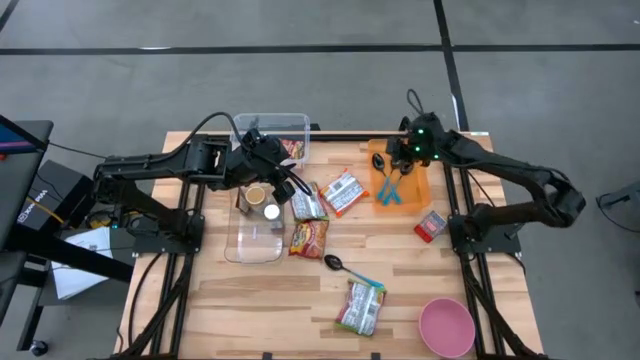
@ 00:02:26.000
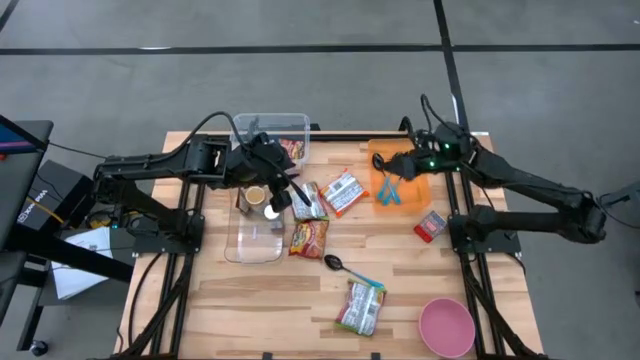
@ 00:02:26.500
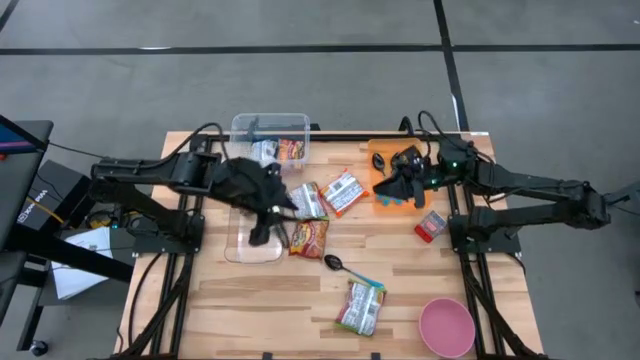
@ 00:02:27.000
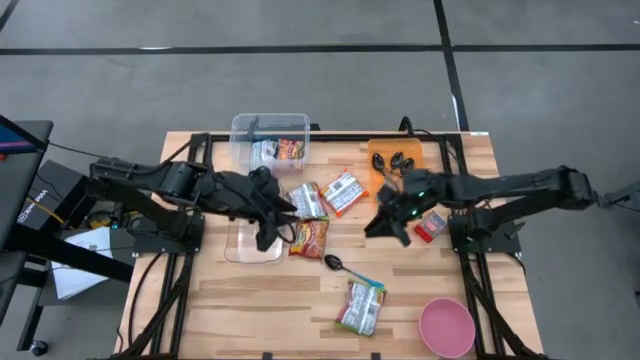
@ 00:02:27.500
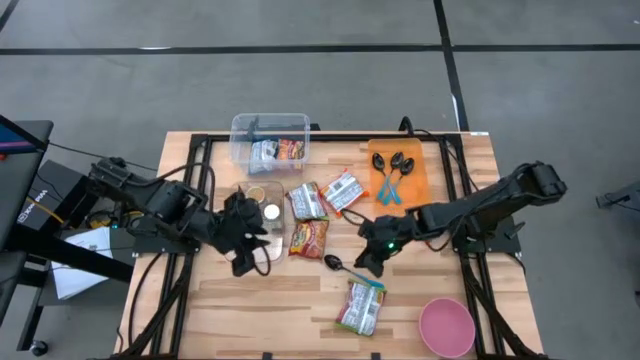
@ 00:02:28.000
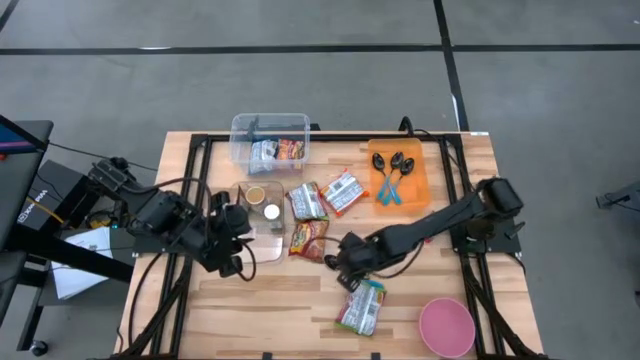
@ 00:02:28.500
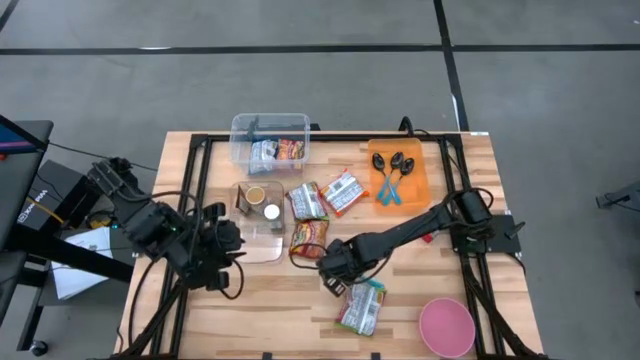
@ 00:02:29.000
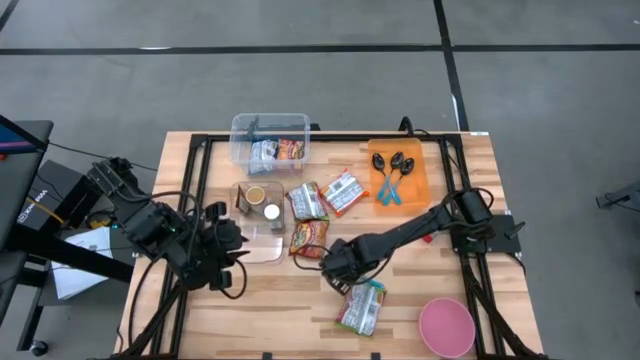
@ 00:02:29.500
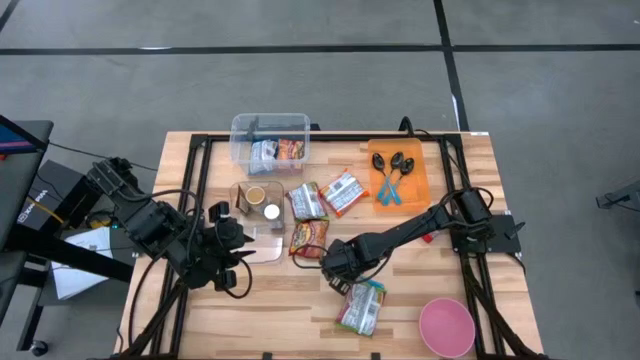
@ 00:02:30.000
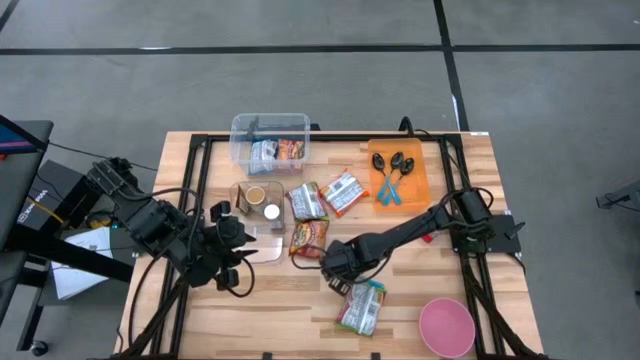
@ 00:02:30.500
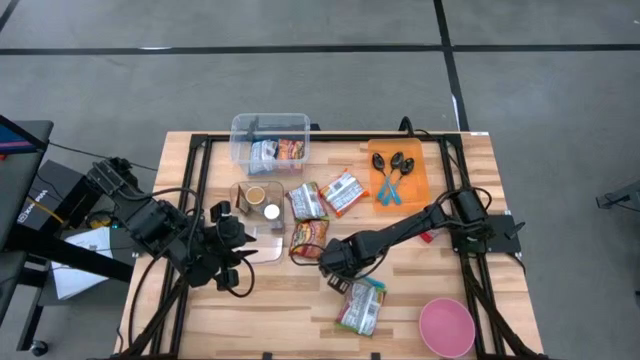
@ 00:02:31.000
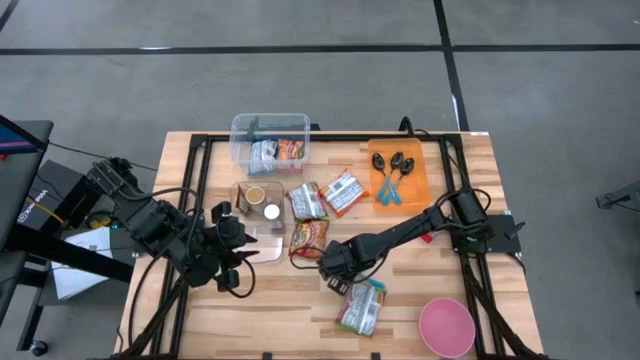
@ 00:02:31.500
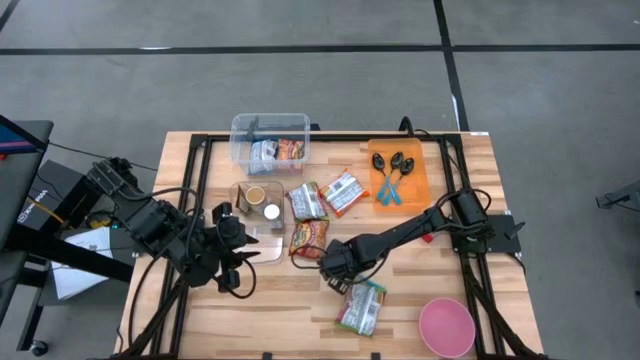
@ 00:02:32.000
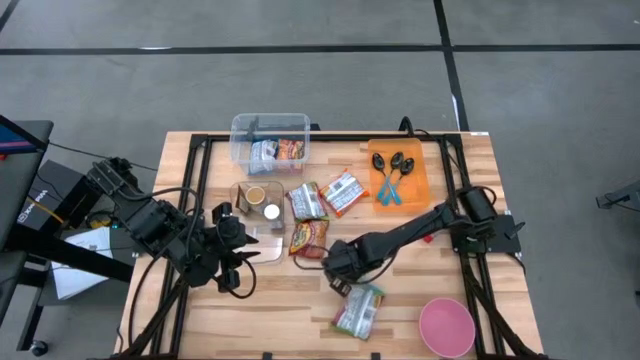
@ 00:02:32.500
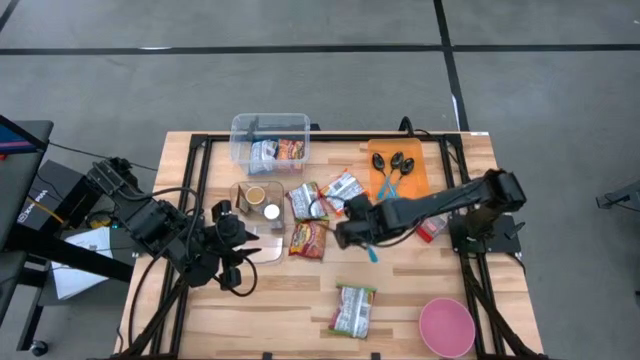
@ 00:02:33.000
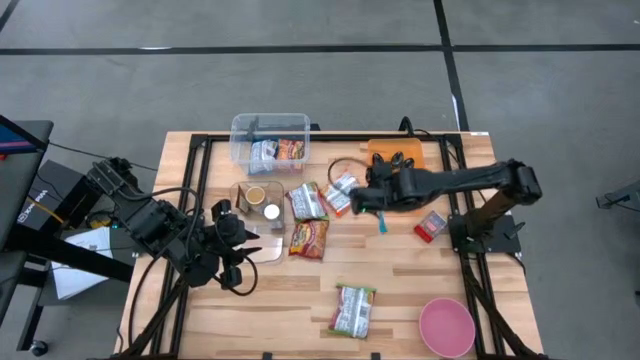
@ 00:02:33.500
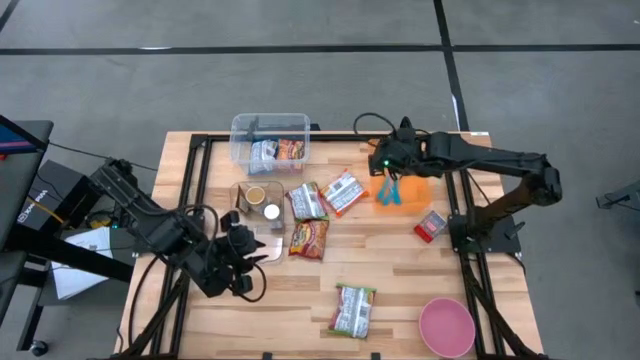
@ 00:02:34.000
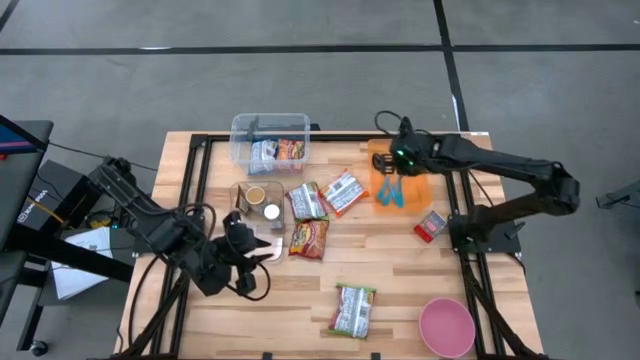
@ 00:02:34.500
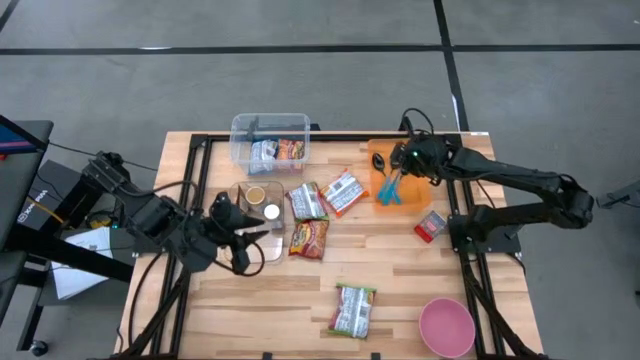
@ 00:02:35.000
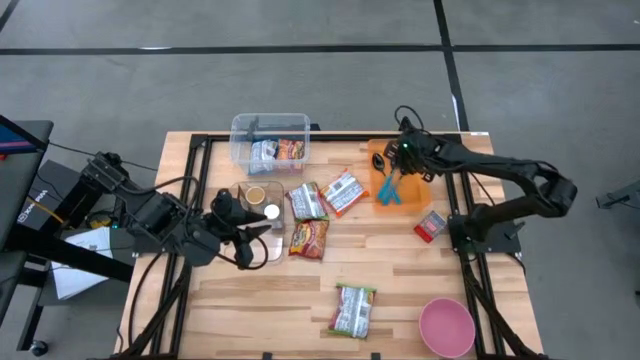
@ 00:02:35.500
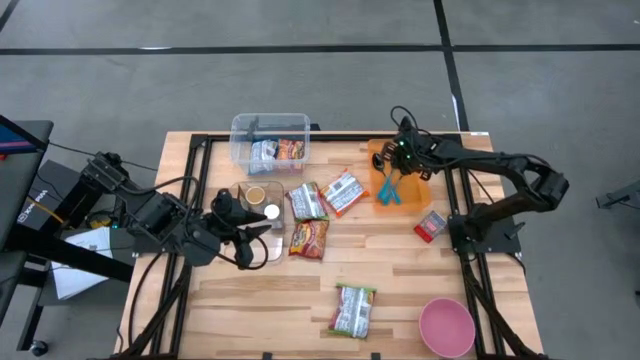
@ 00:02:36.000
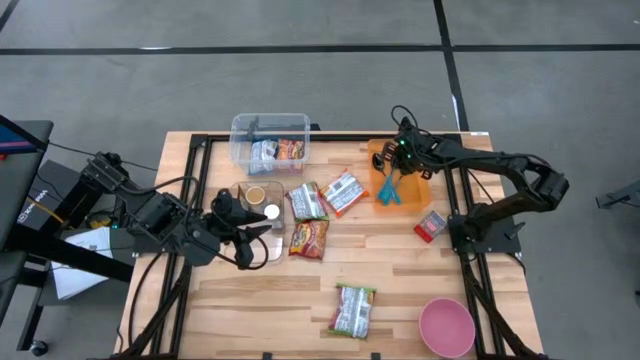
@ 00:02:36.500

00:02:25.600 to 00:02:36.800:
Task: Pick & Place Food Item
Put the blue spoon into the orange container

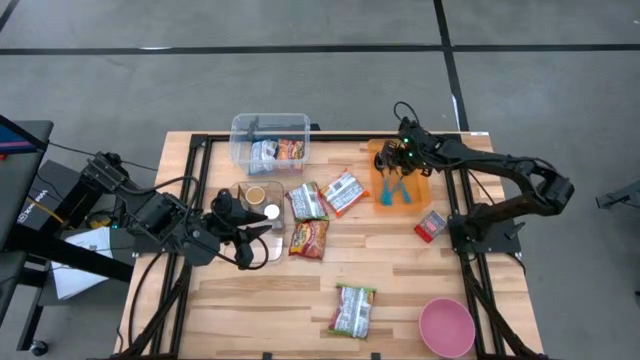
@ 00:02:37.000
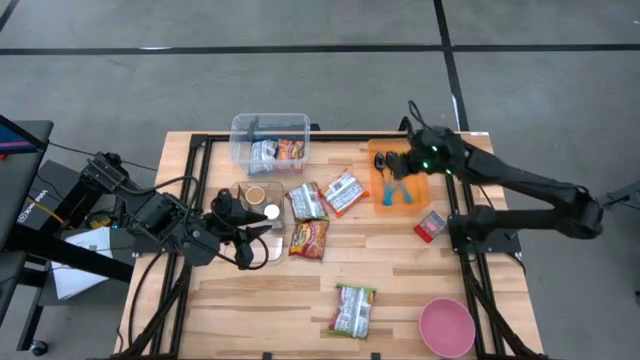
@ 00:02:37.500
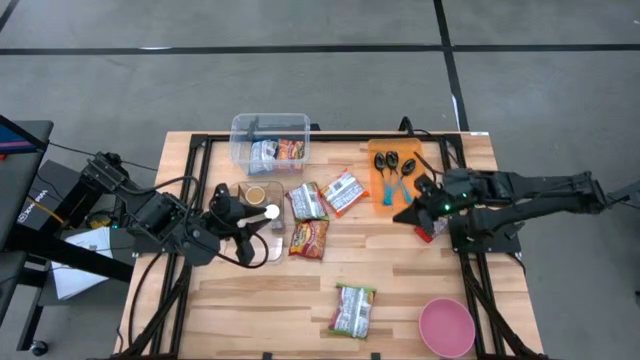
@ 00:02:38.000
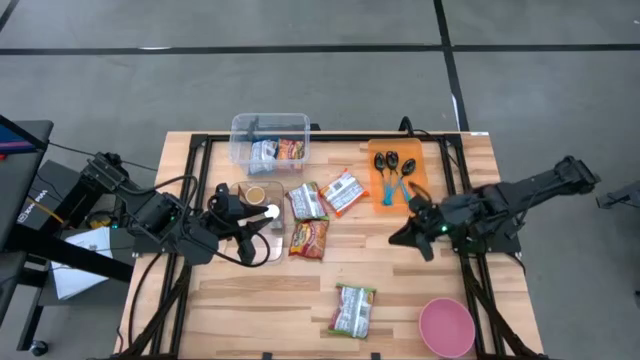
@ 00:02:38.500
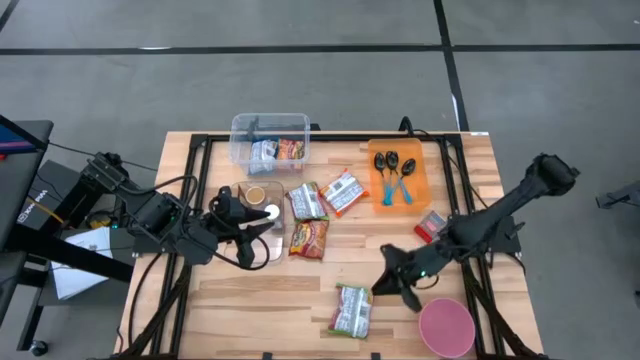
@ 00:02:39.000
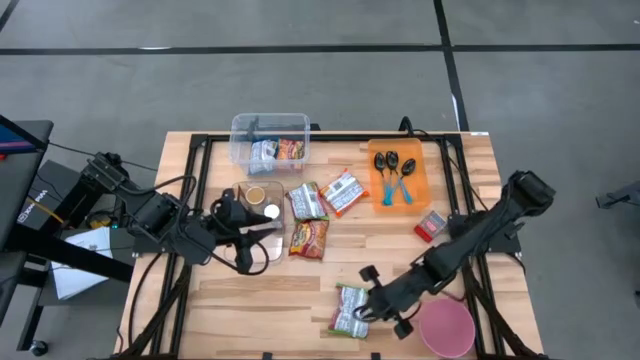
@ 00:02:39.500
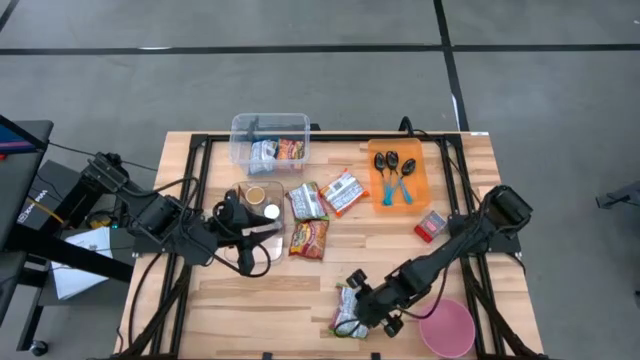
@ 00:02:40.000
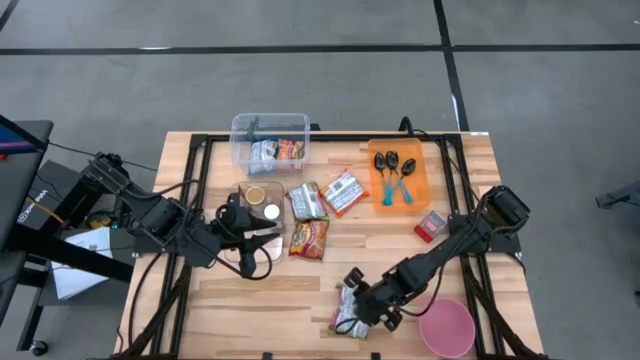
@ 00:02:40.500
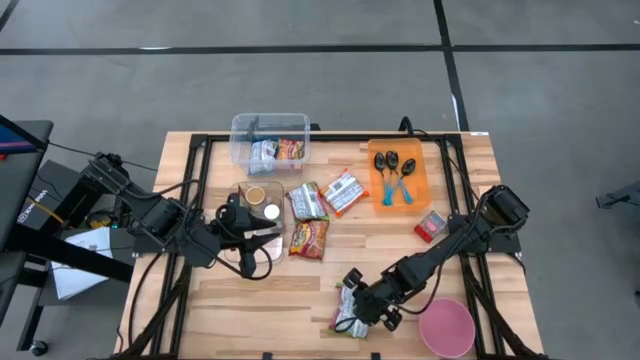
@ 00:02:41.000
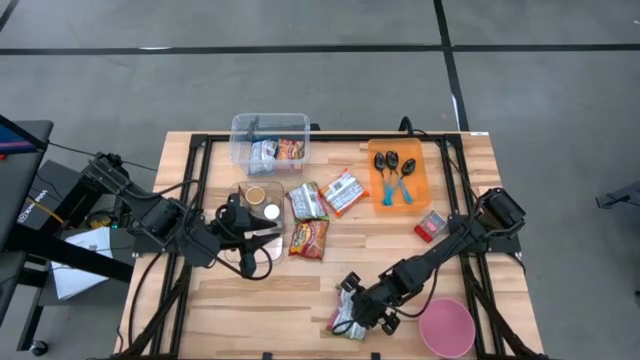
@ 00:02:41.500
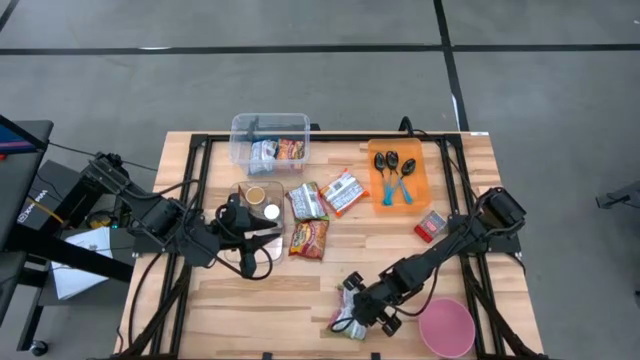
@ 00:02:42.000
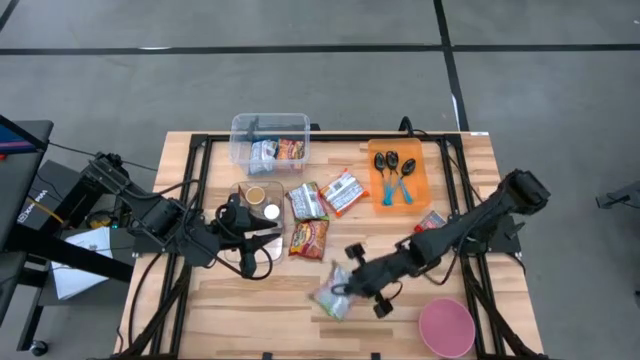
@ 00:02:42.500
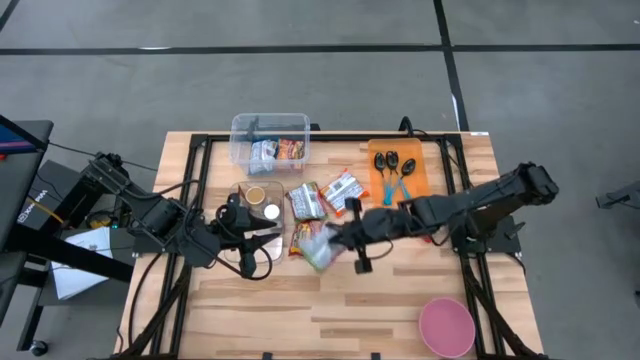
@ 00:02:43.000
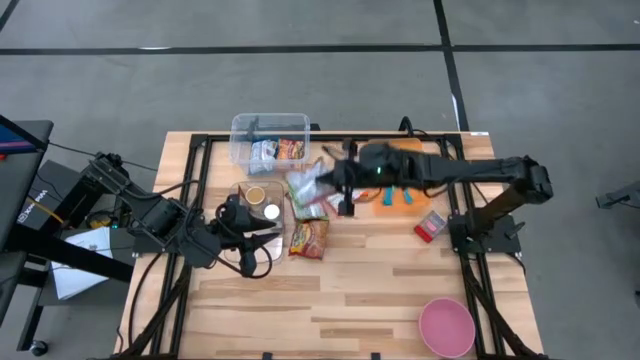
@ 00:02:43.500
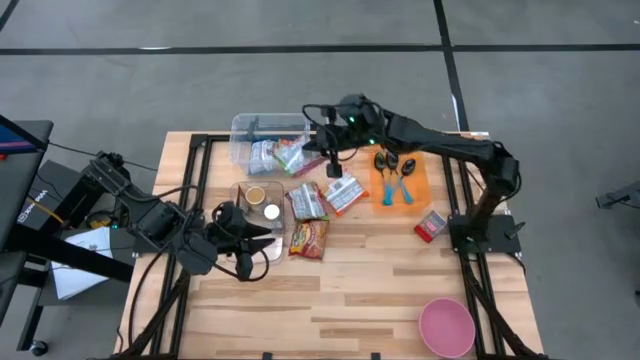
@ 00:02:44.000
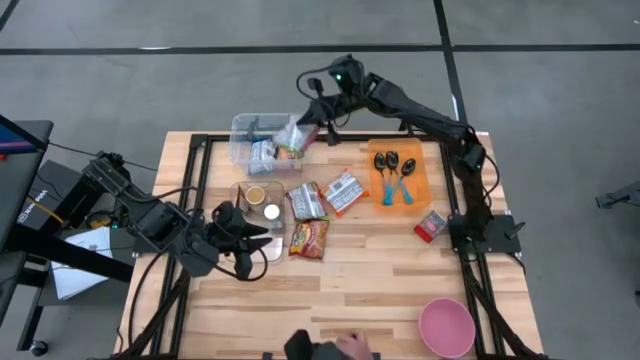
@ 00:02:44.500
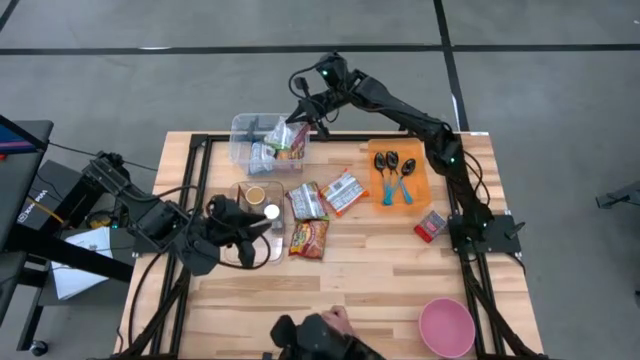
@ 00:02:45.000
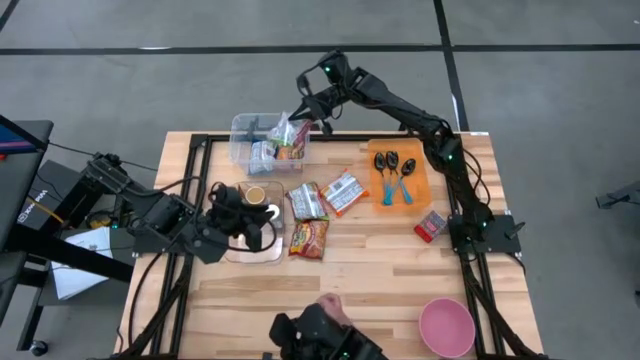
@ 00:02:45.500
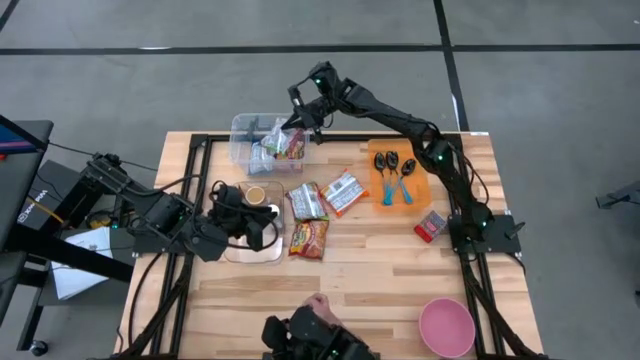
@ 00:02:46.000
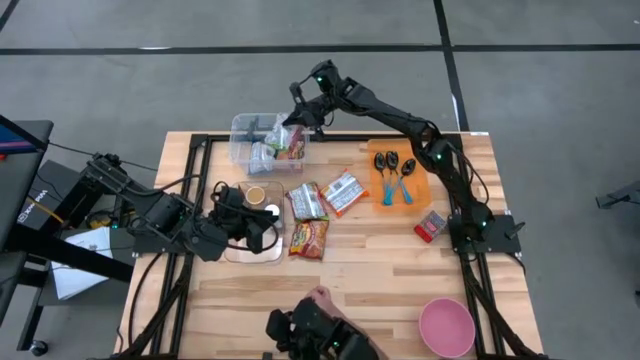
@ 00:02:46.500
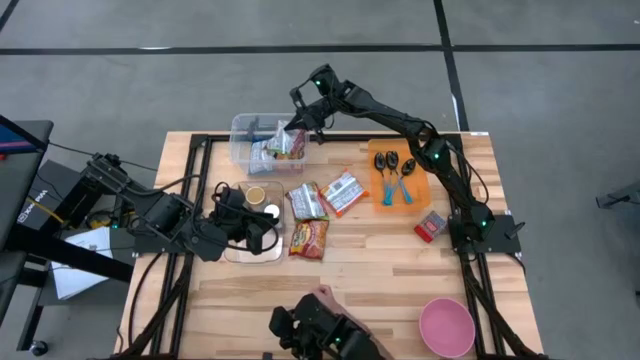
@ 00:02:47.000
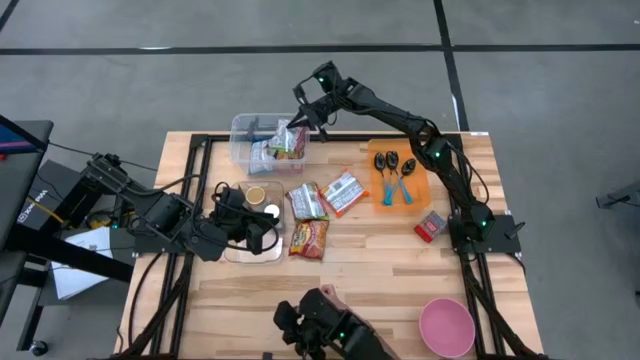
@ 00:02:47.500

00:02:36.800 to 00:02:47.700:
Put the green noodle pack into the transparent container
